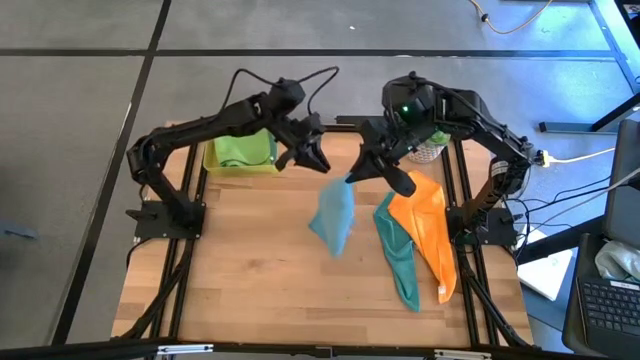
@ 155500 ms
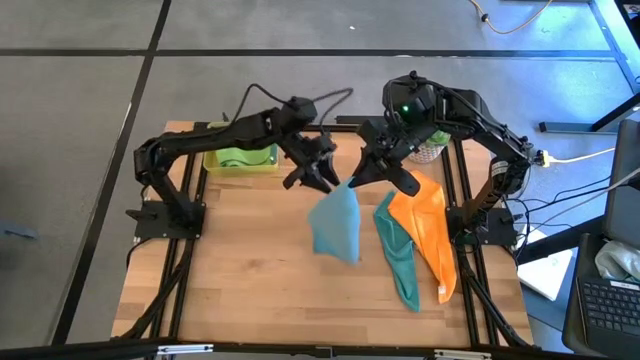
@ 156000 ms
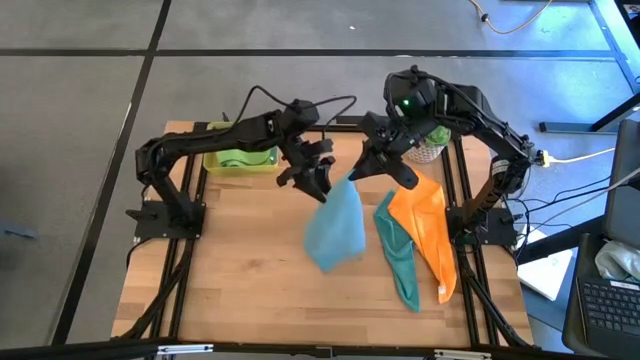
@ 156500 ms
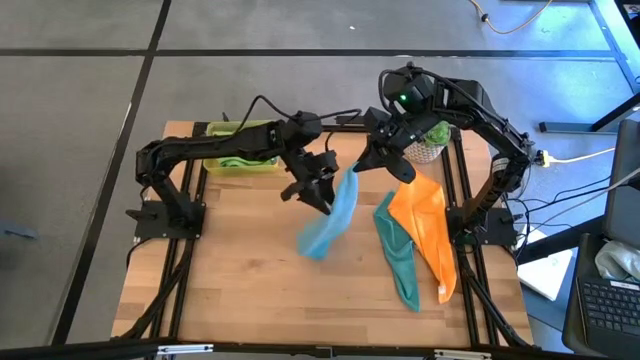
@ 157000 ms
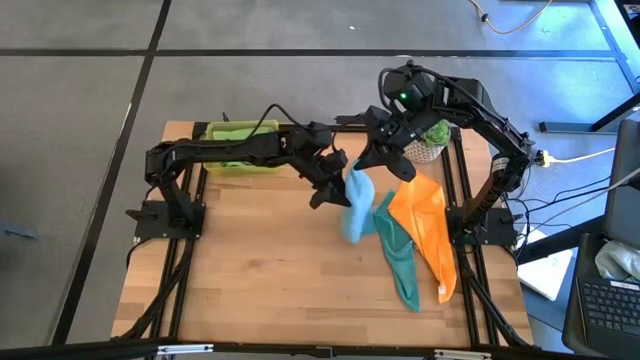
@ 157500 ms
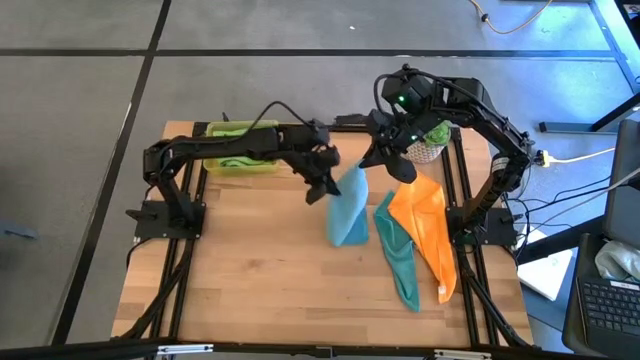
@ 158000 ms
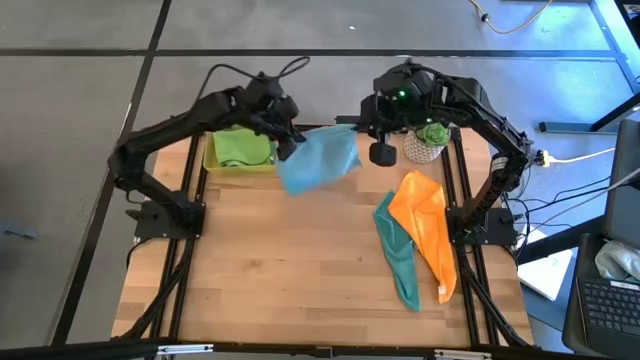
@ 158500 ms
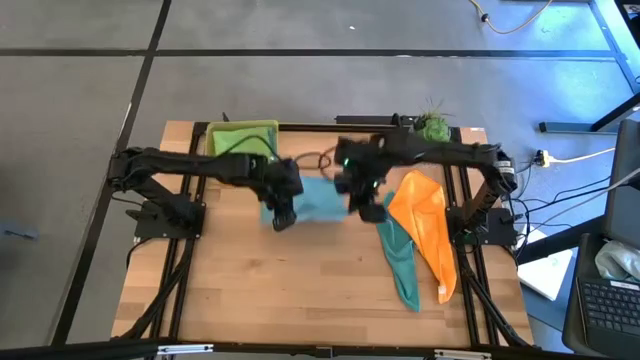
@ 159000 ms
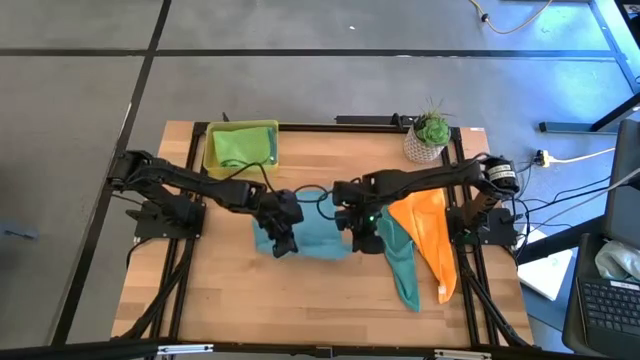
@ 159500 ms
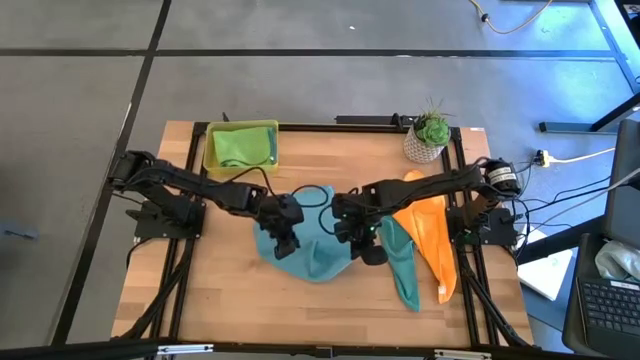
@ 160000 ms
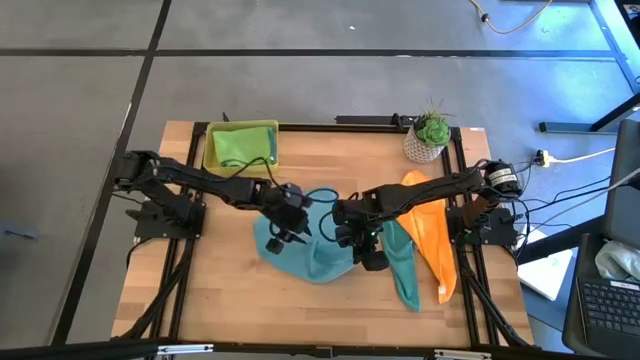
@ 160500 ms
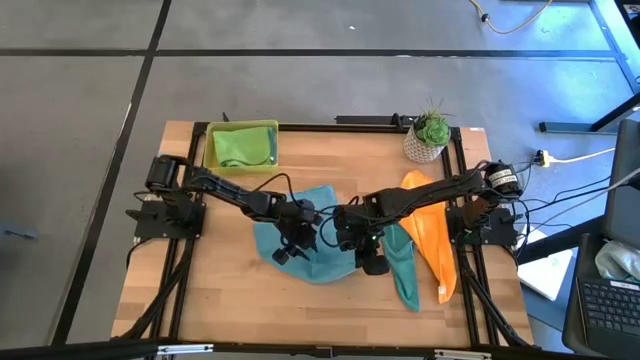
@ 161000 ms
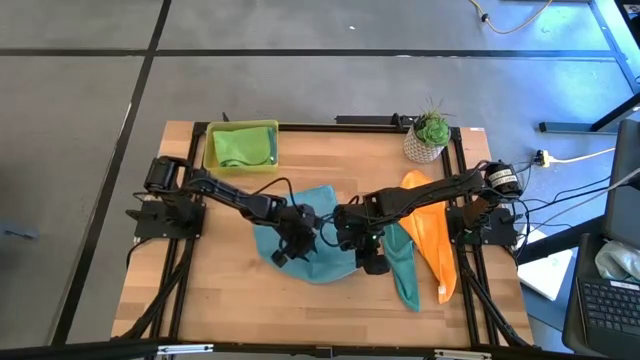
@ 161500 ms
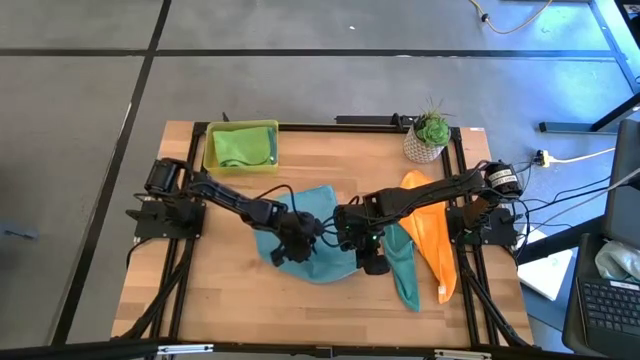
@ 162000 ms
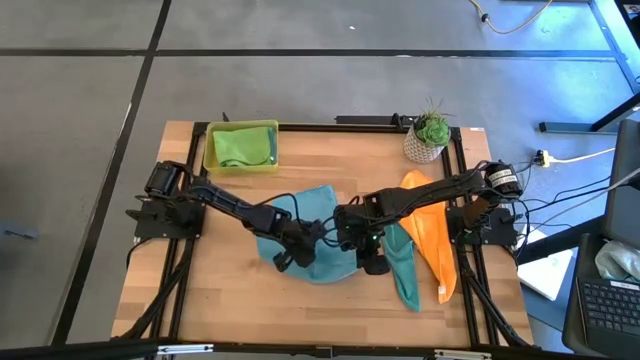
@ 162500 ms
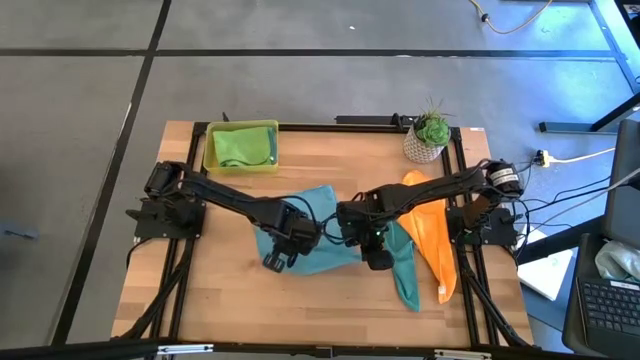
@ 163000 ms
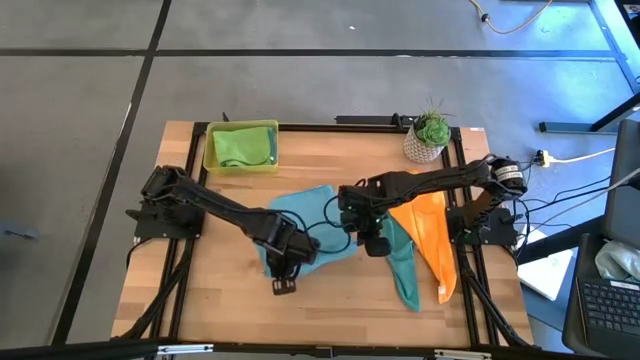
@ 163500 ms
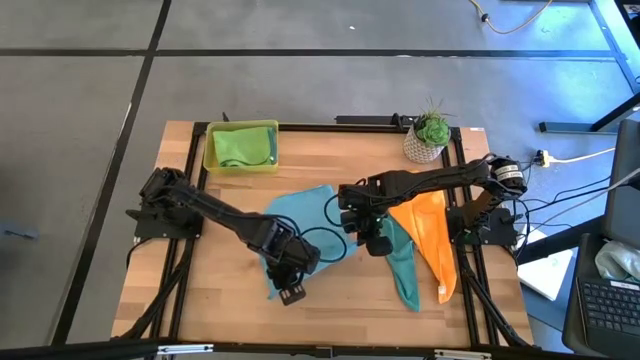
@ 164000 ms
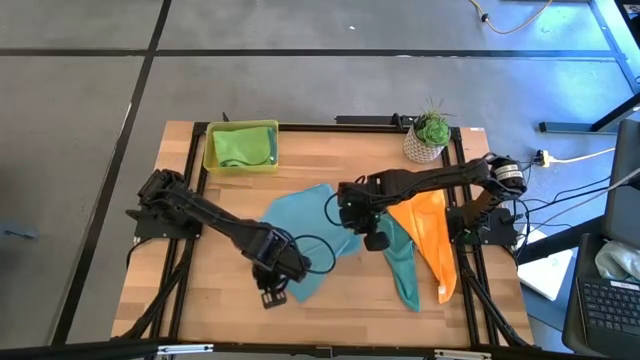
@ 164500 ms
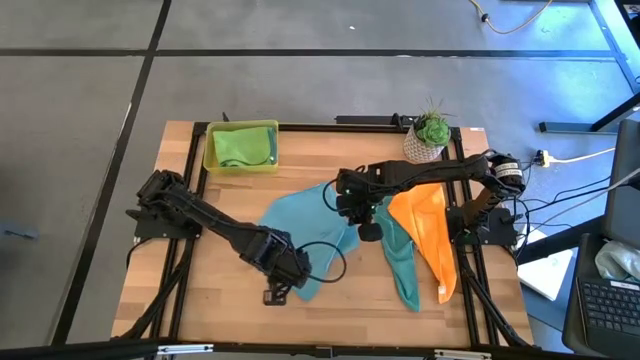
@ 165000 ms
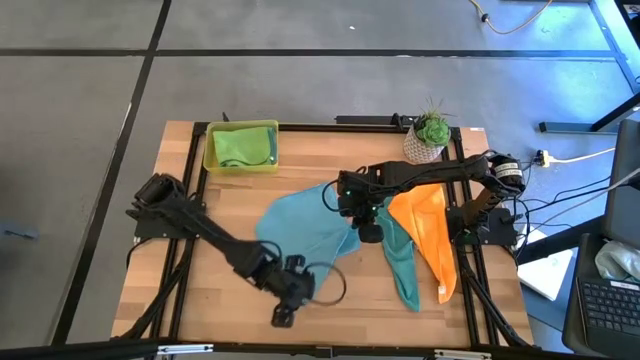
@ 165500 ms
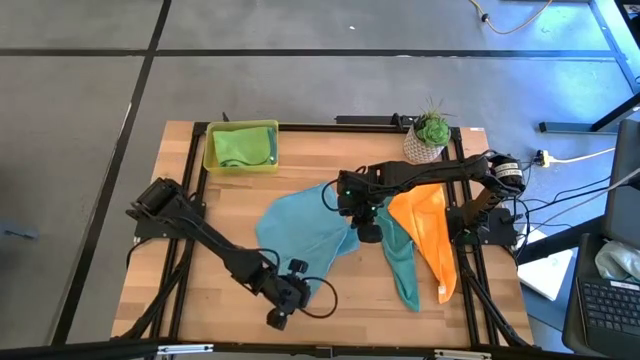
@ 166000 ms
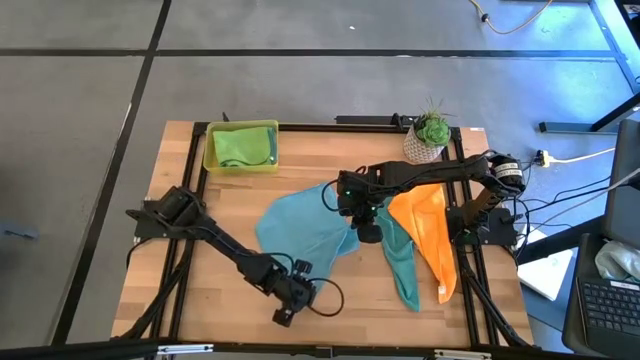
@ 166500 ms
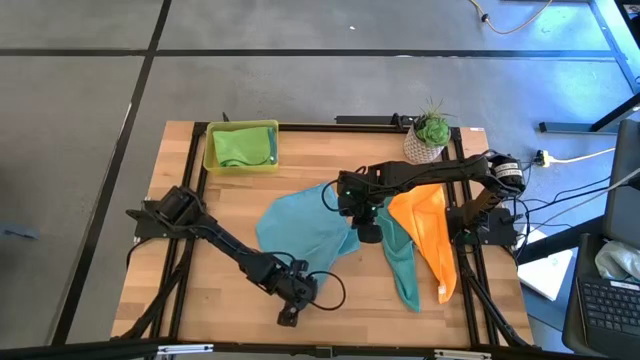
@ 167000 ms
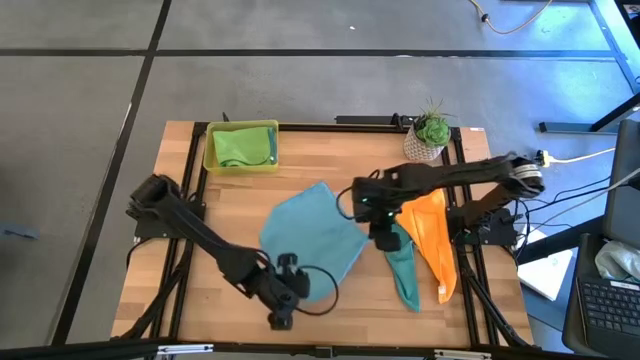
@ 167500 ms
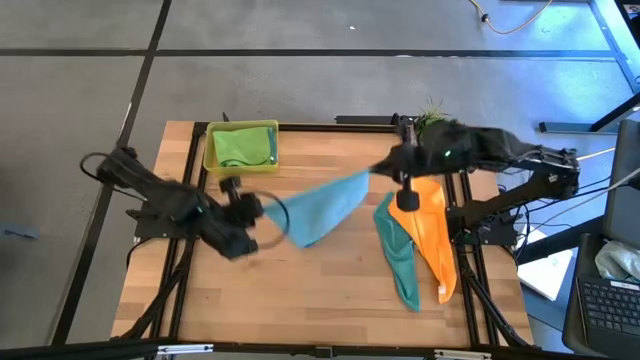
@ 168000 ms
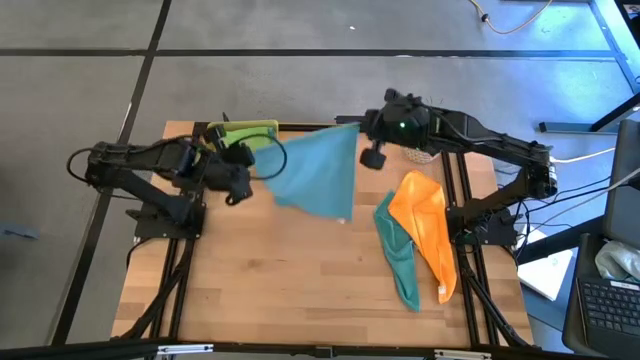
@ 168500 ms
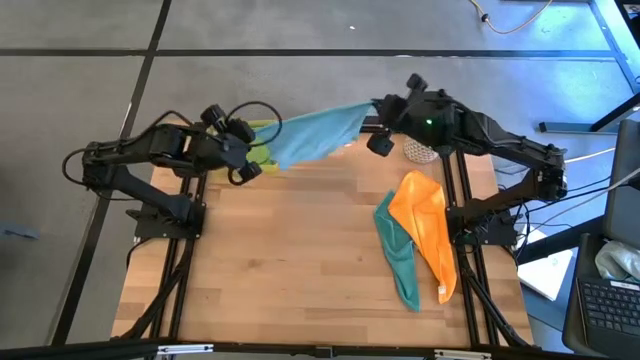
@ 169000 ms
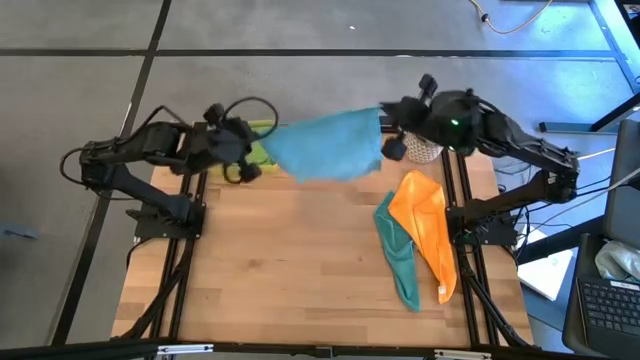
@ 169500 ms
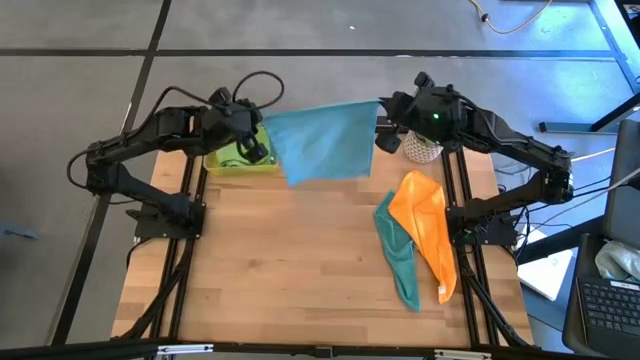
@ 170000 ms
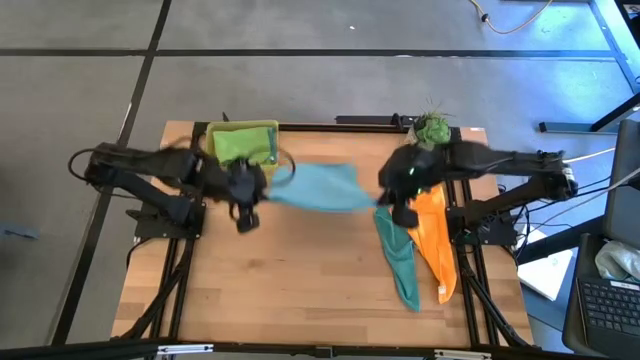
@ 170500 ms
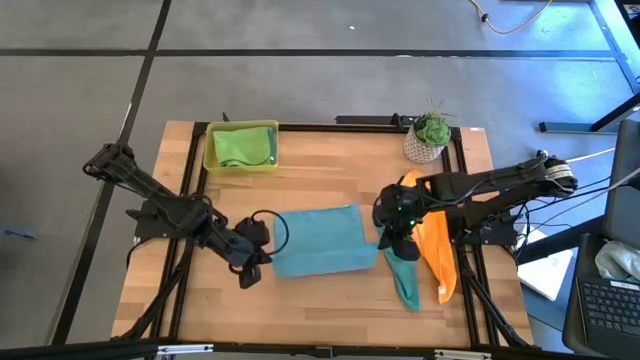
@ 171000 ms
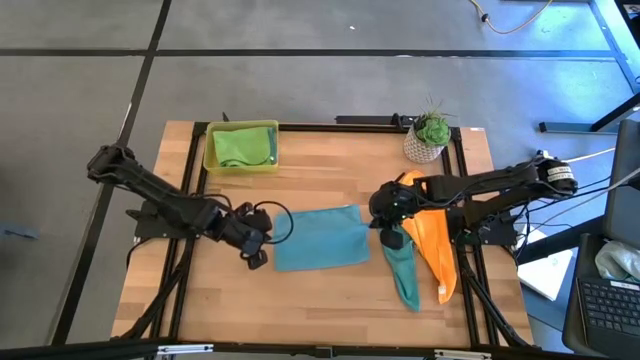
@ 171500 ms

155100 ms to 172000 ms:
Task: Fold microfiber towels
Fold the left blue towel

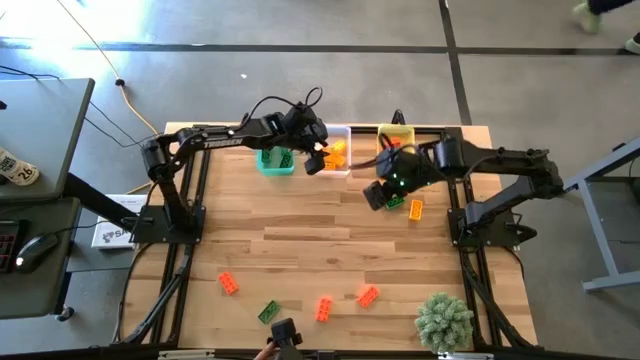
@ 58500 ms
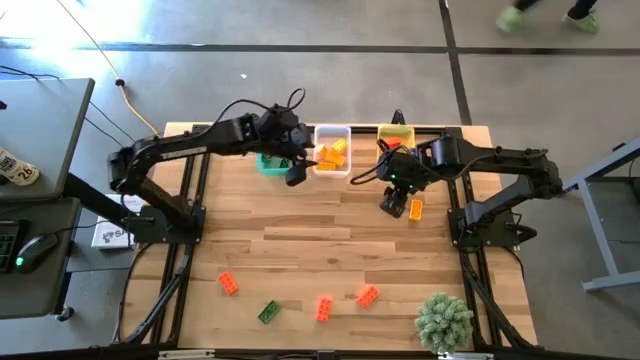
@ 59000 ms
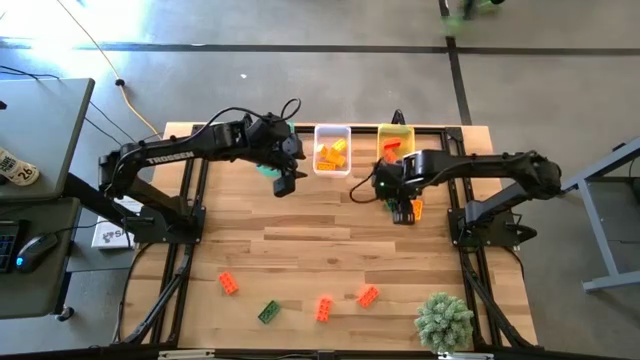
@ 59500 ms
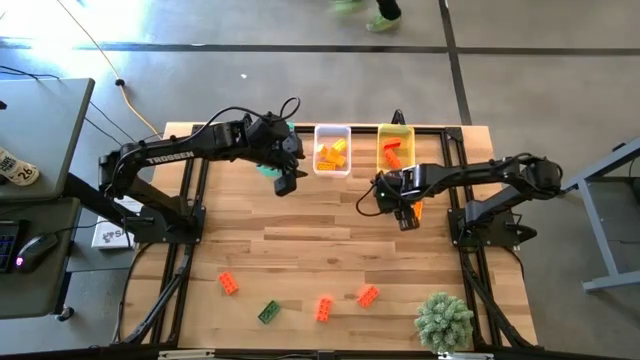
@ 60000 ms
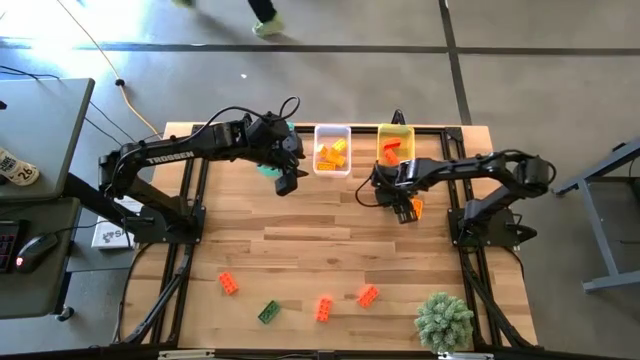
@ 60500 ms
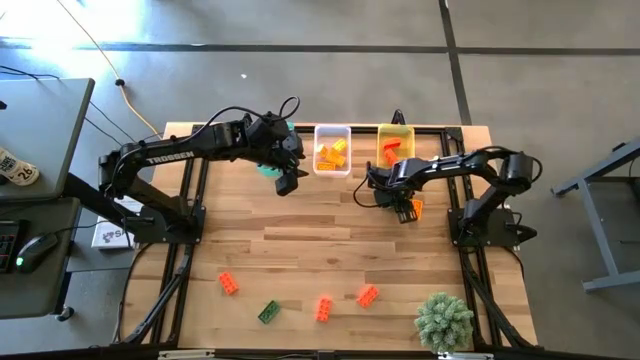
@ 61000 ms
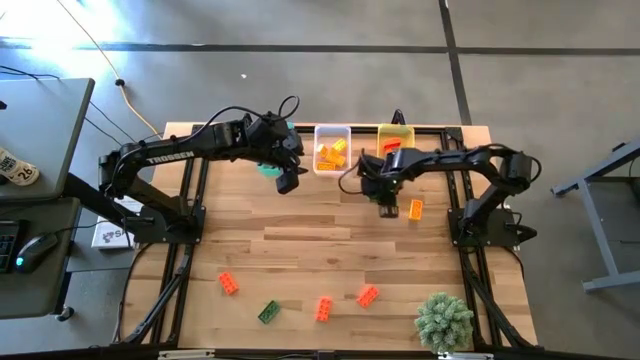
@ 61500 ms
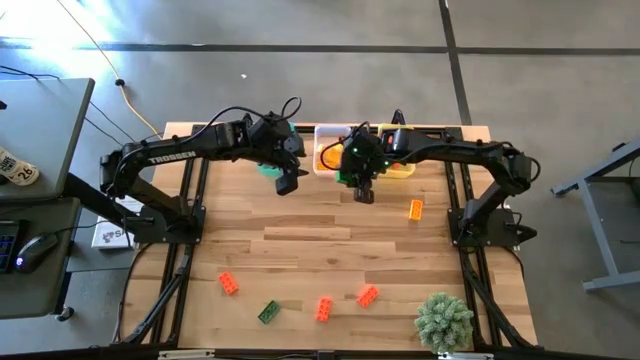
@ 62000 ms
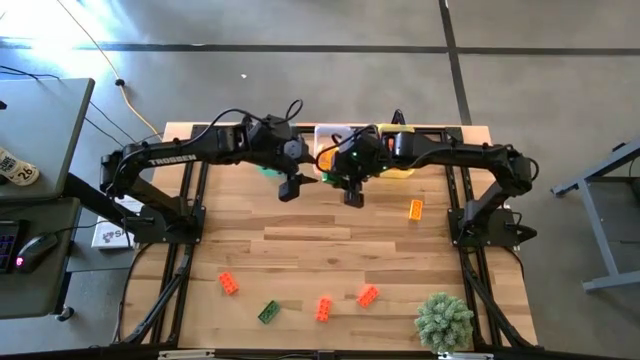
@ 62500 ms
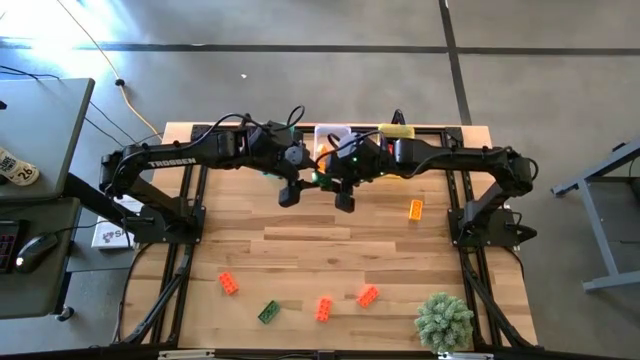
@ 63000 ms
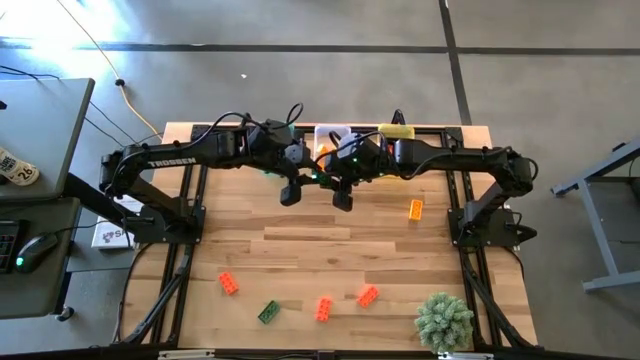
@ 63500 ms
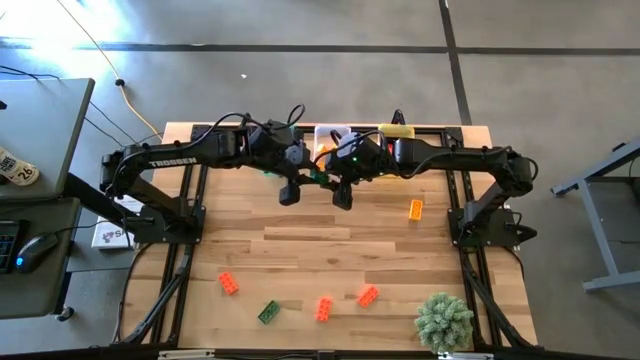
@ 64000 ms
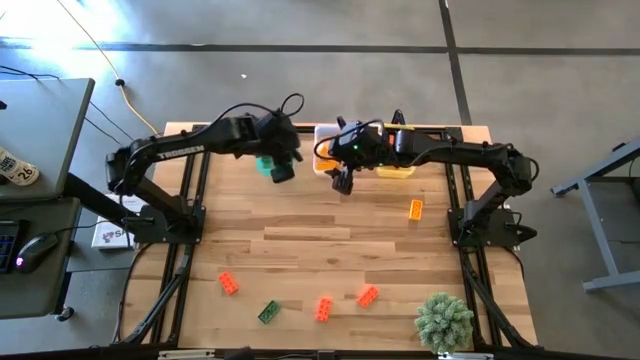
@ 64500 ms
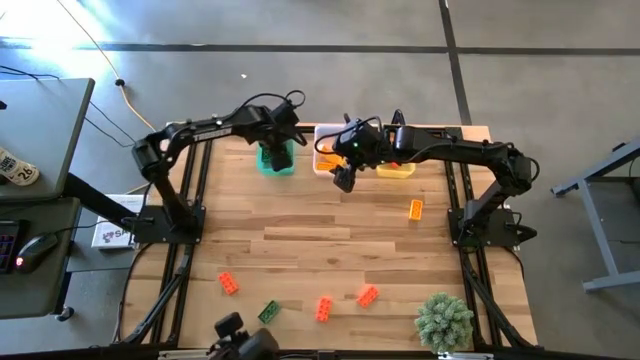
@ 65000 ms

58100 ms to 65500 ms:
Task: Sort & place blocks by color
Put the green game piece into the green bin
